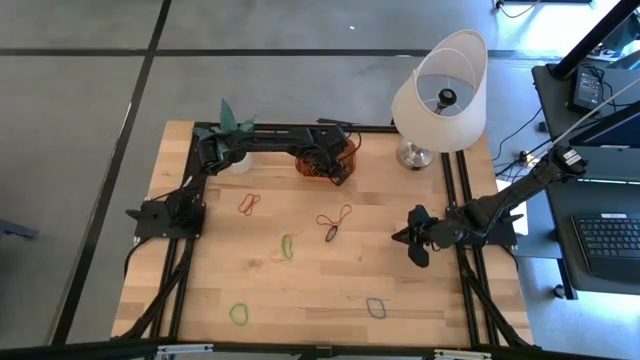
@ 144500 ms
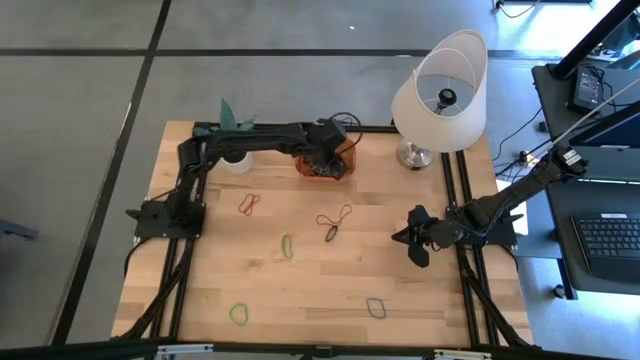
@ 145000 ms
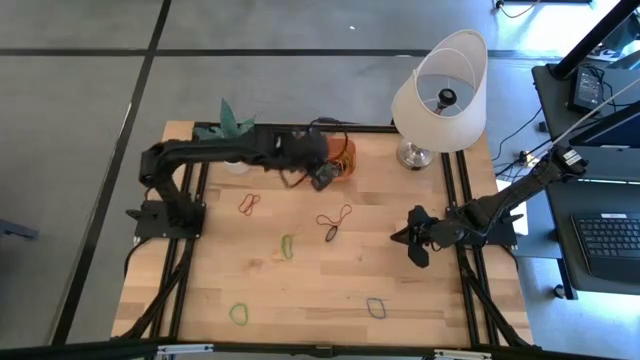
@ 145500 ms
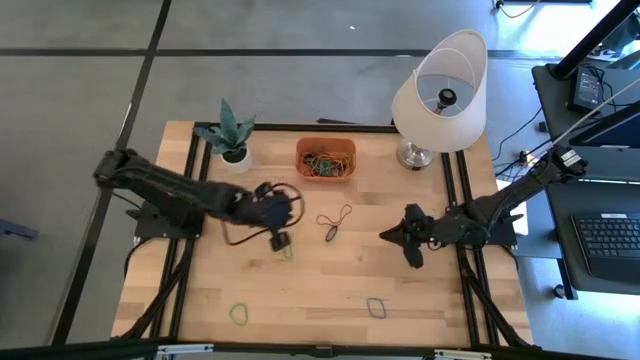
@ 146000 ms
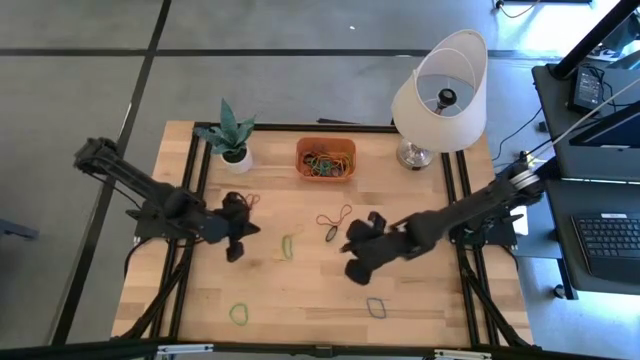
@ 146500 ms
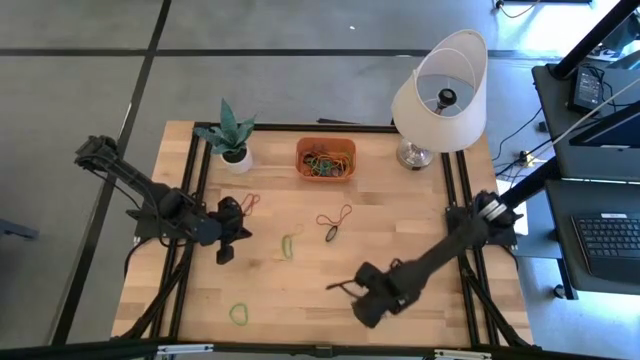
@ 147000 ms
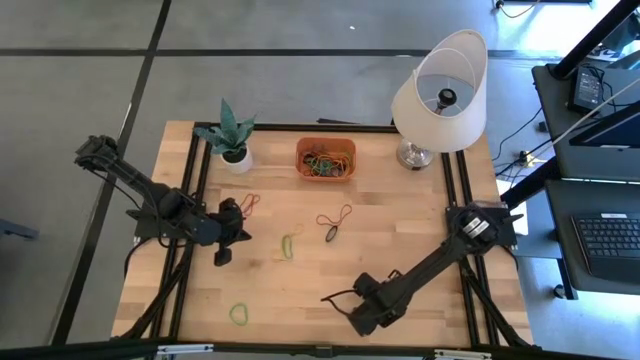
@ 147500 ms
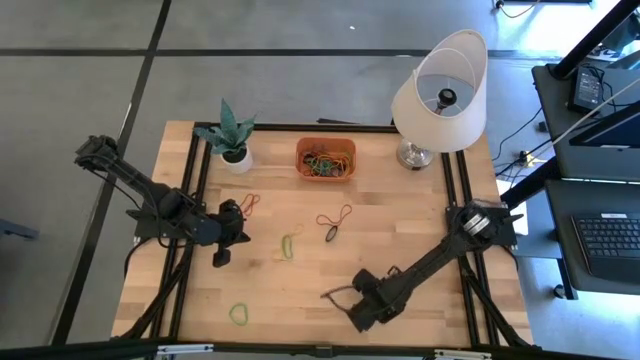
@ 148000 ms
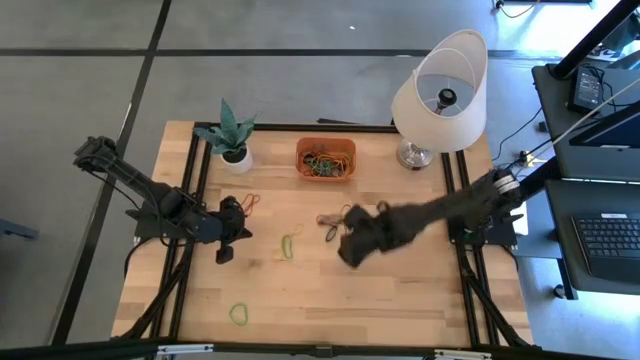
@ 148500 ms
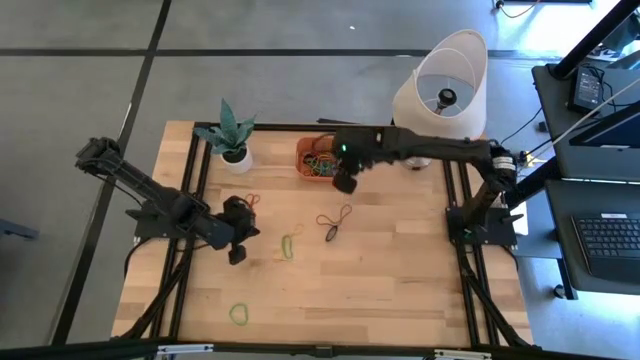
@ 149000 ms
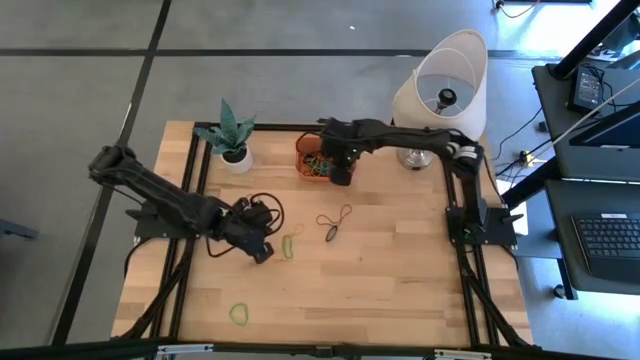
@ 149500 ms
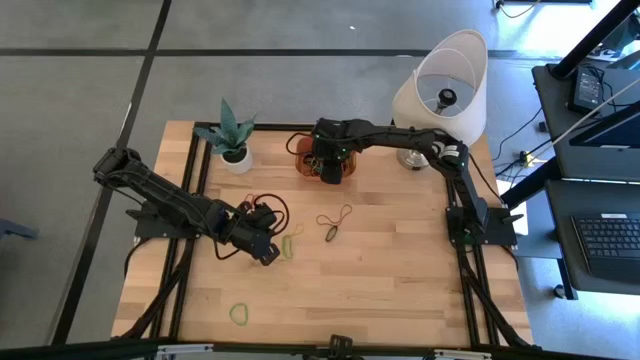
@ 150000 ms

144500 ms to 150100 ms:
Task: Pick and place rubber bands into bin
Put the blue rubber band into the orange bin

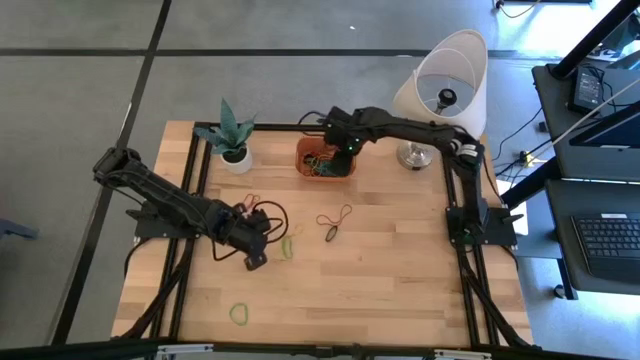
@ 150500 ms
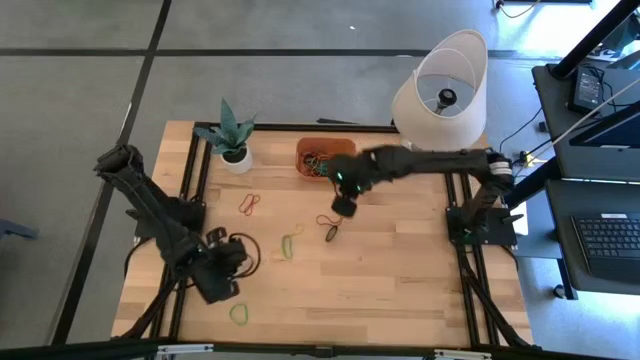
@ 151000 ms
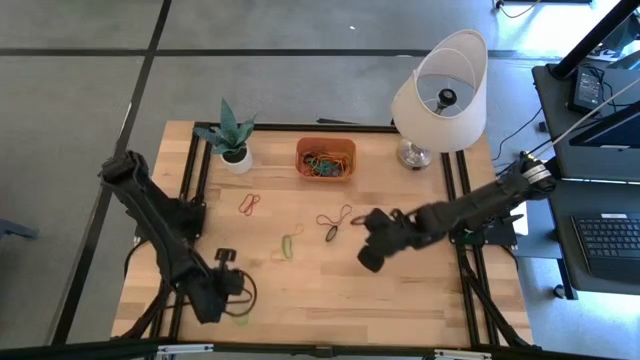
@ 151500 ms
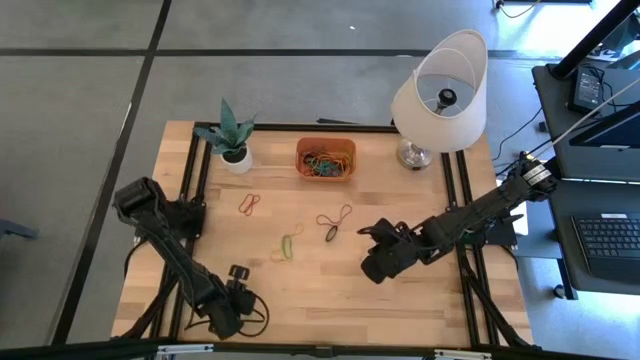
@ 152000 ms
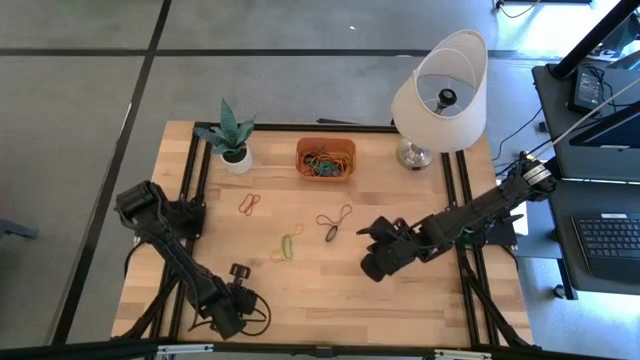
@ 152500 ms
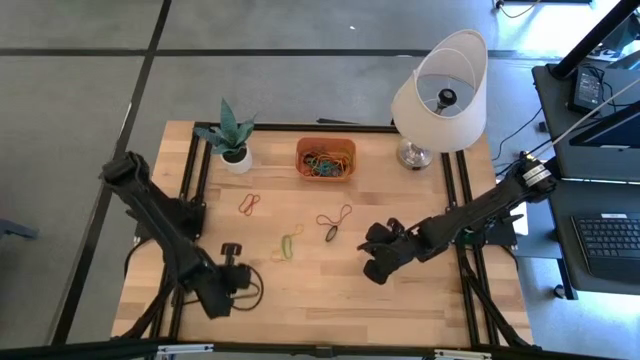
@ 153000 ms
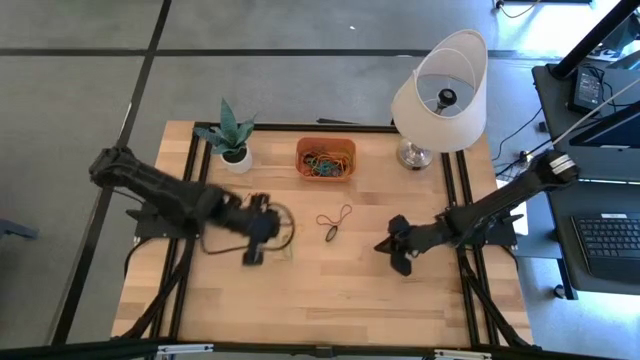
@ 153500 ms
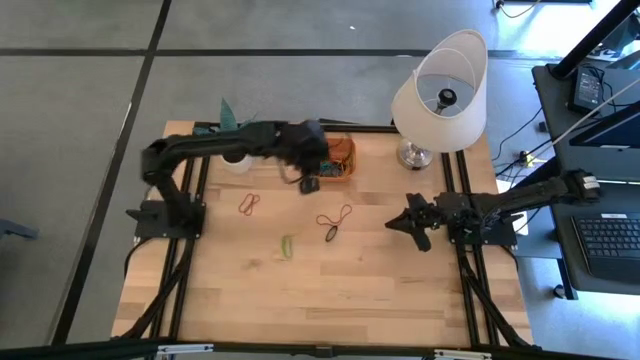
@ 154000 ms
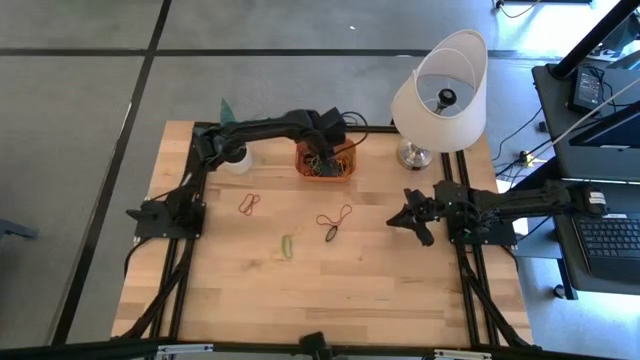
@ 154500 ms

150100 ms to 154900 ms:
Put the bottom green rubber band into the orange bin

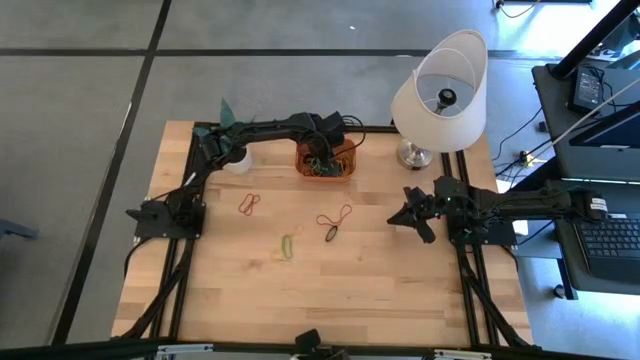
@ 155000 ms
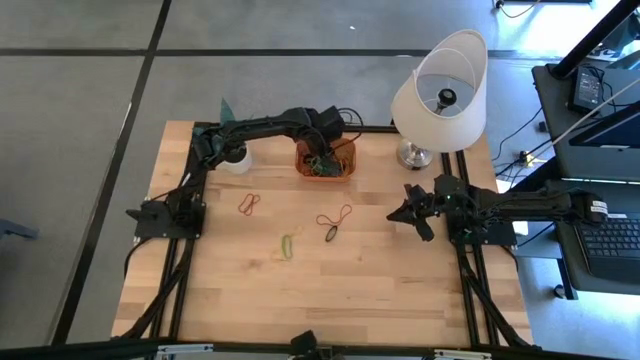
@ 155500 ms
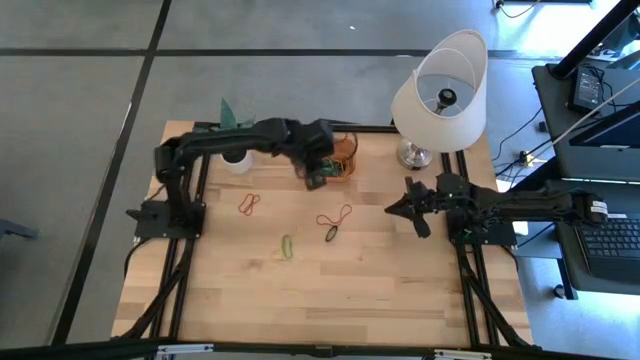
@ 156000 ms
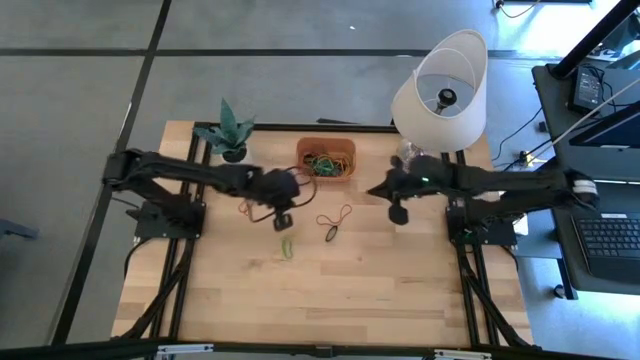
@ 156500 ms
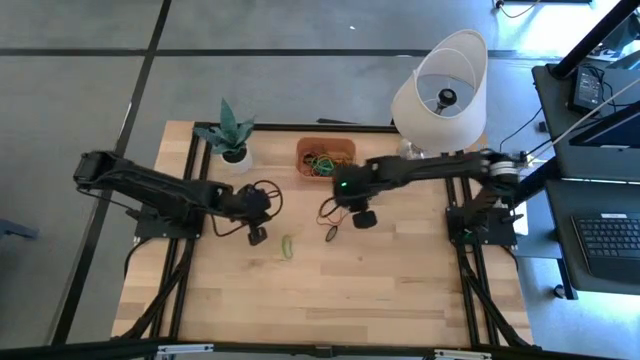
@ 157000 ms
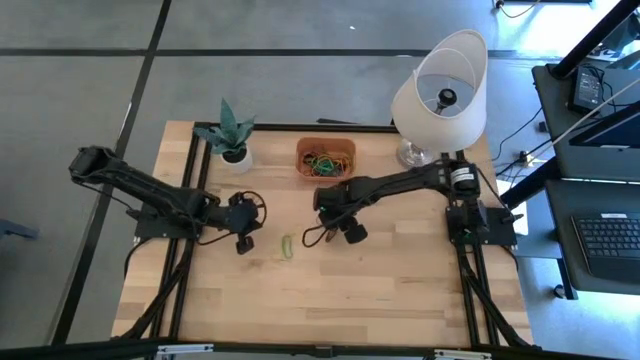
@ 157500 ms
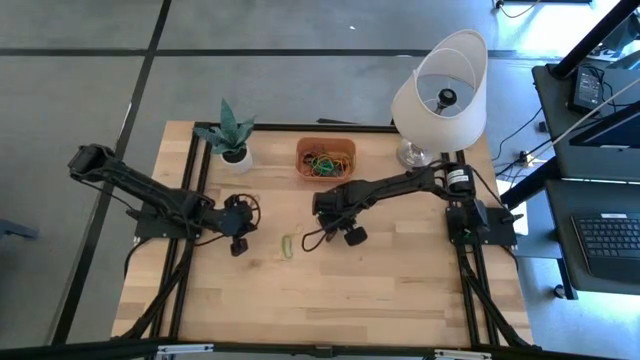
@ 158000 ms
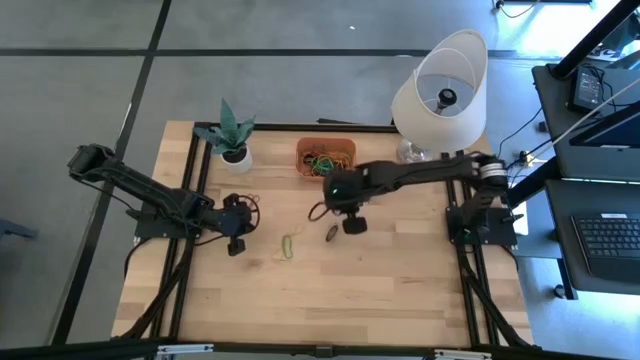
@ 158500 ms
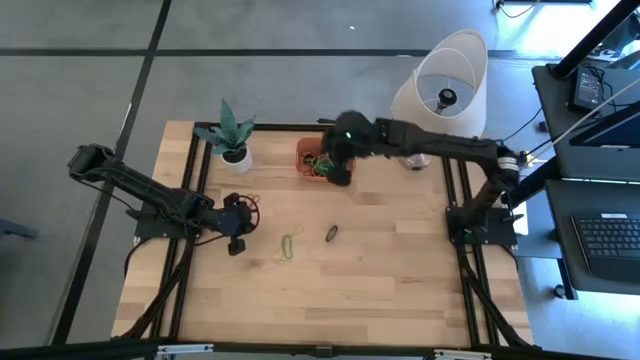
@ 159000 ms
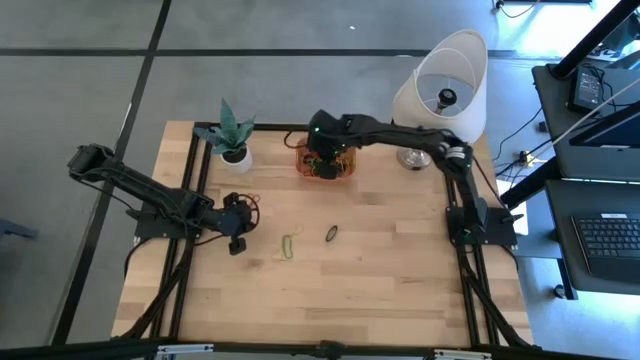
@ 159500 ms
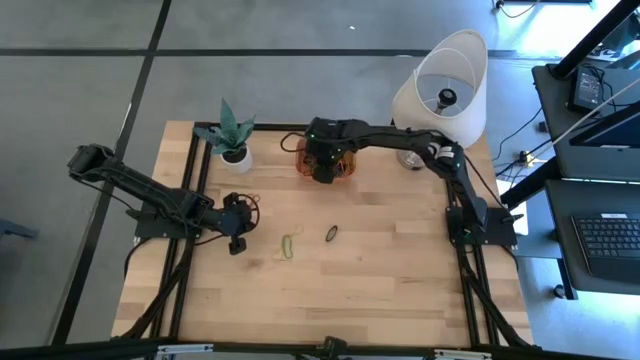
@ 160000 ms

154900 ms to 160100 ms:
Put the right red rubber band into the orange bin

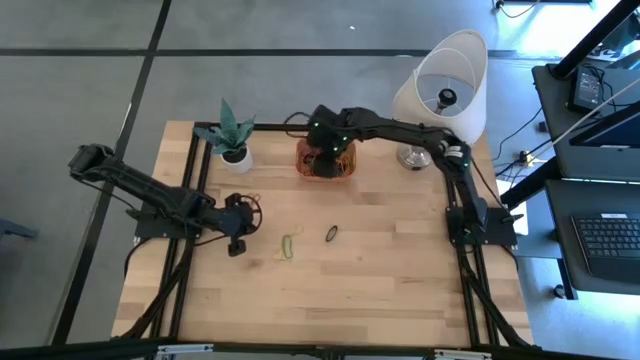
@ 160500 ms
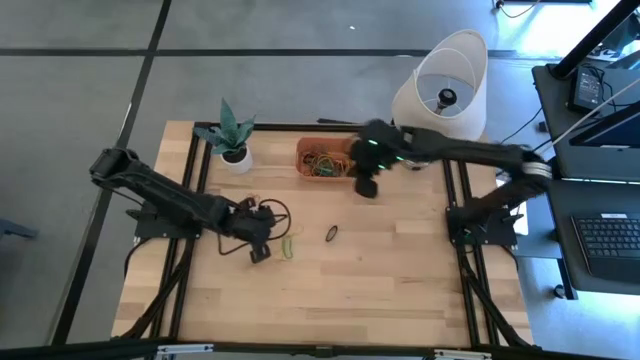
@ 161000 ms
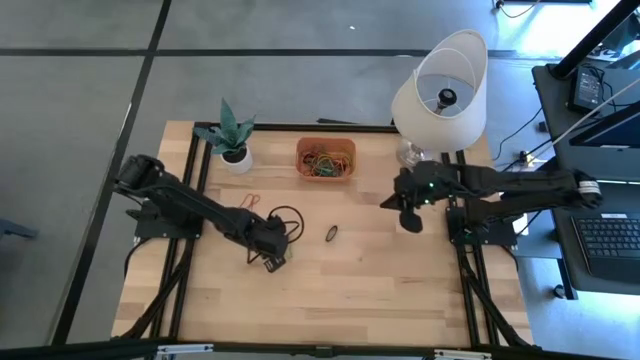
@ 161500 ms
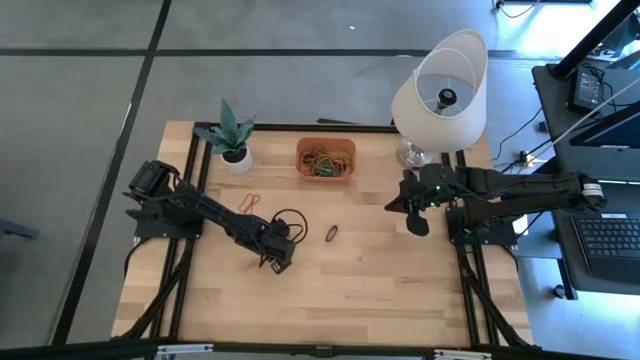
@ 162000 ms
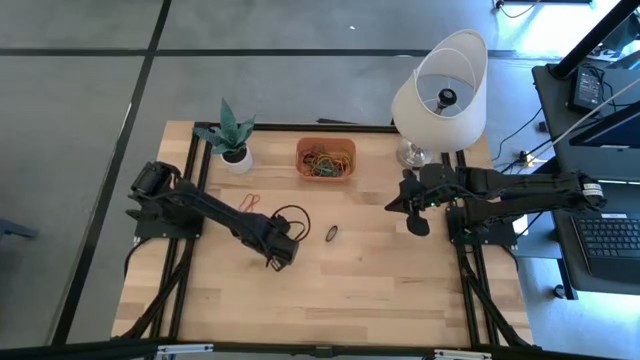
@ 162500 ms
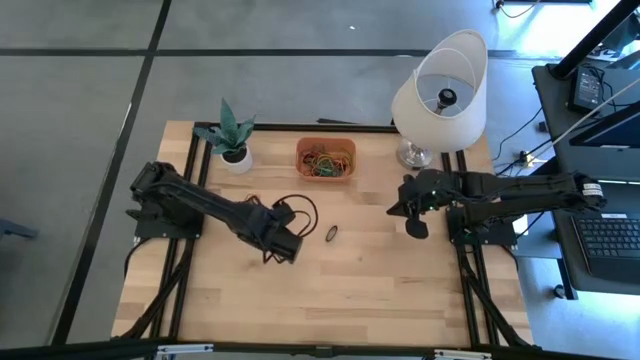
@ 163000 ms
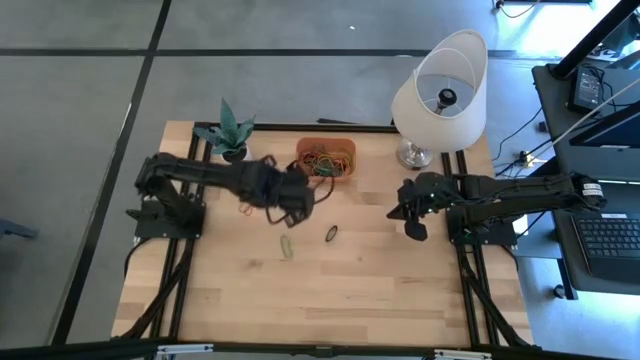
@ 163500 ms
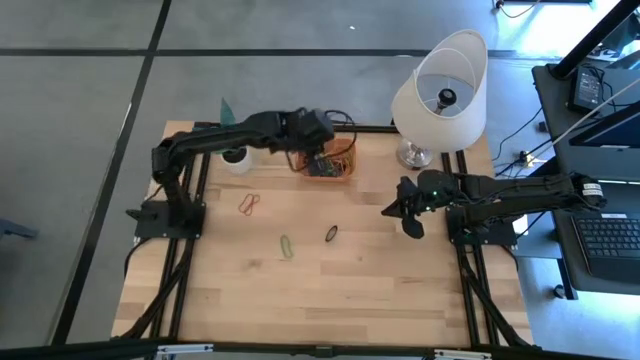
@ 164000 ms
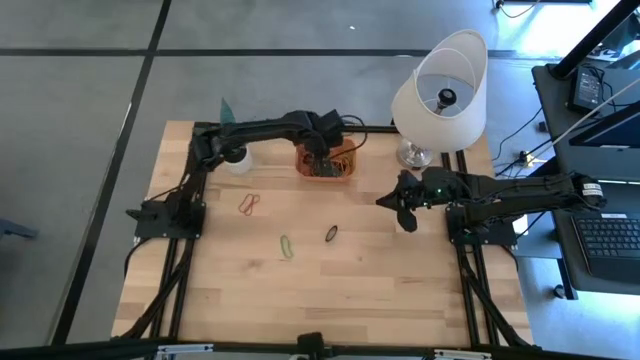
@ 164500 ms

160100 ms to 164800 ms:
Put the yellow rubber band into the orange bin
